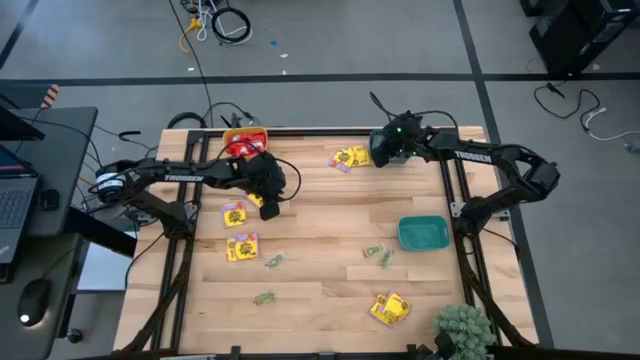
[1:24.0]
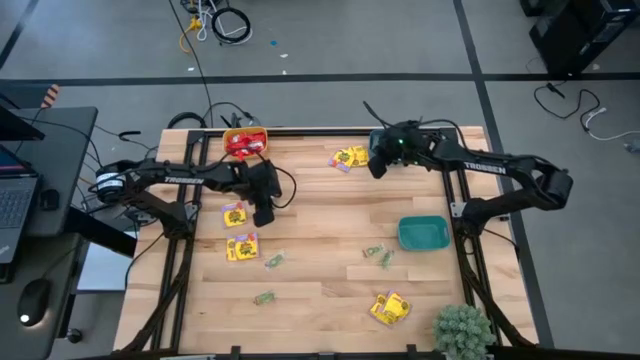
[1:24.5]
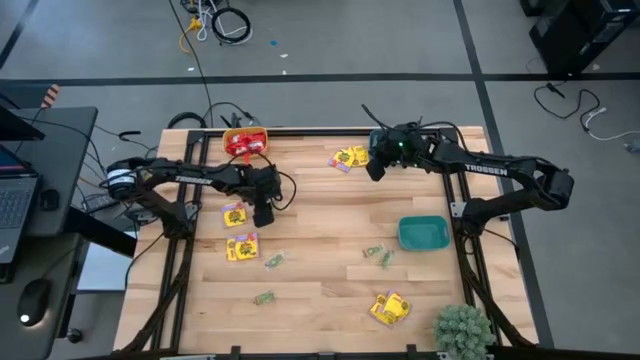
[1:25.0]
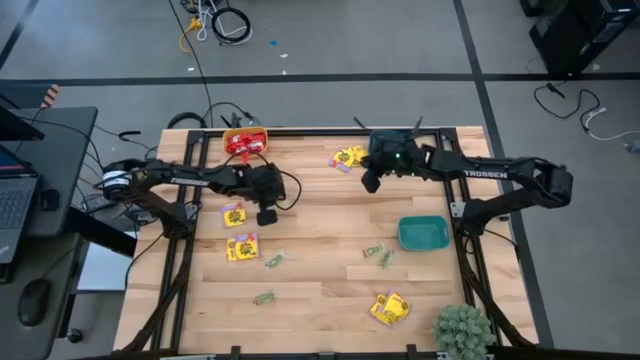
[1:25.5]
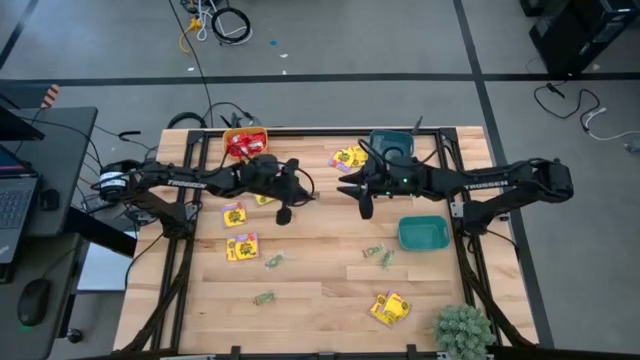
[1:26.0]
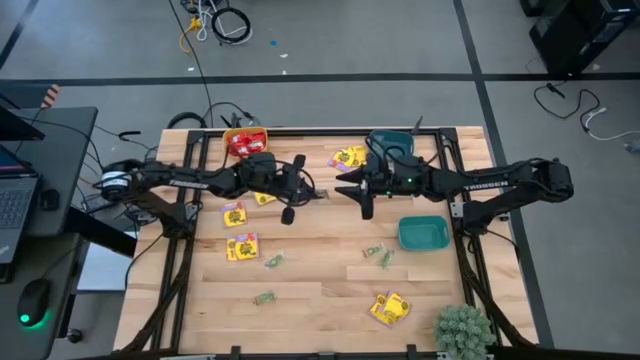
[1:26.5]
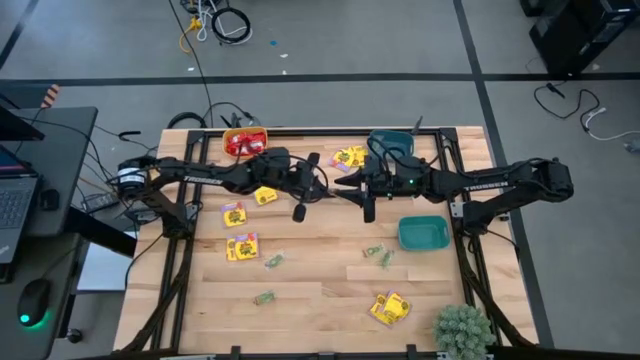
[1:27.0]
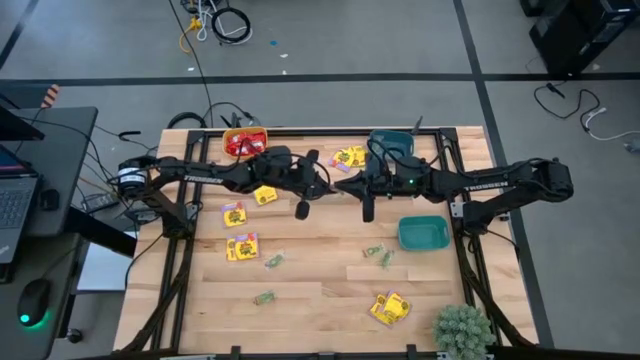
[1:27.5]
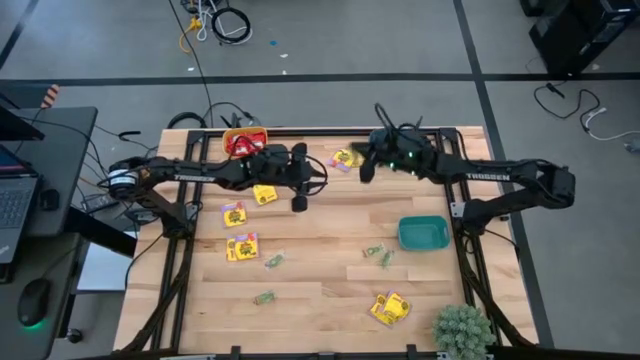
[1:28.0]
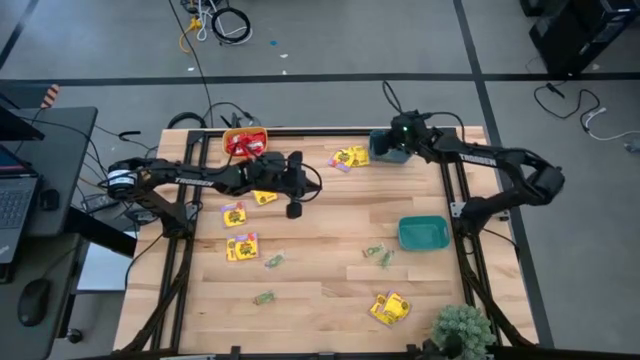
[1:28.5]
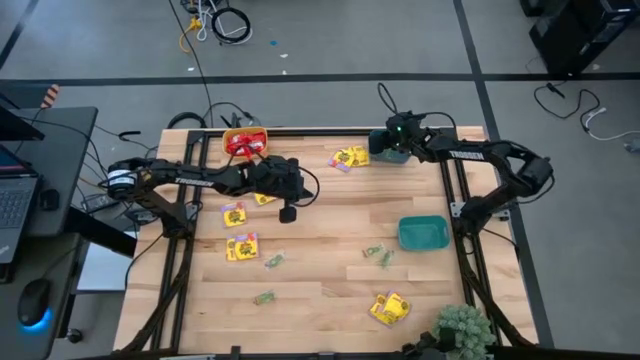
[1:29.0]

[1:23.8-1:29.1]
Task: Sort candy
Put the green gummy into the blue bin

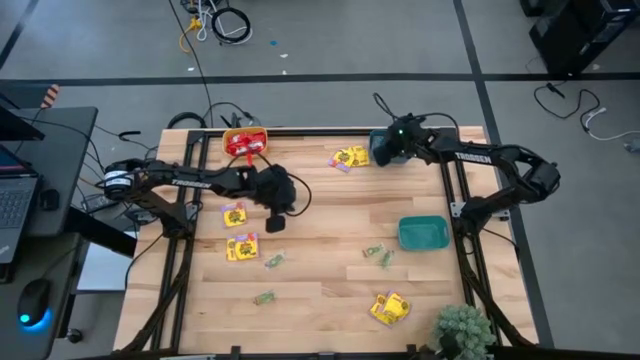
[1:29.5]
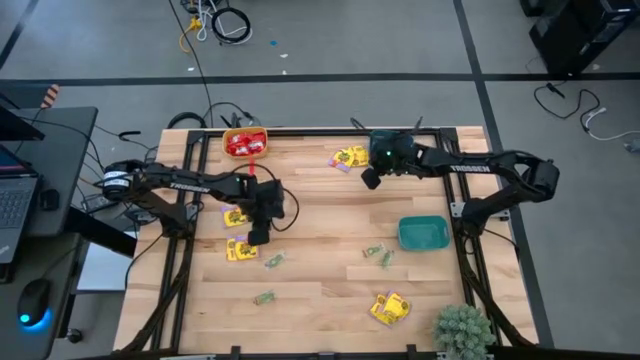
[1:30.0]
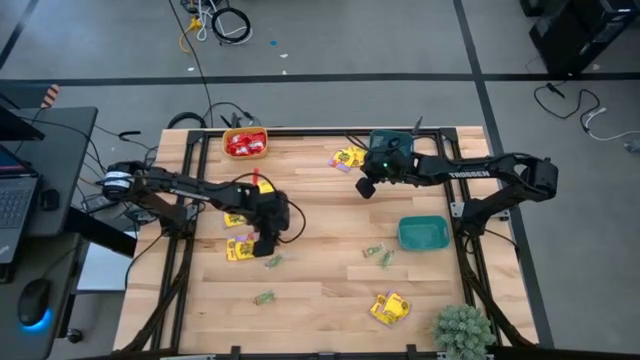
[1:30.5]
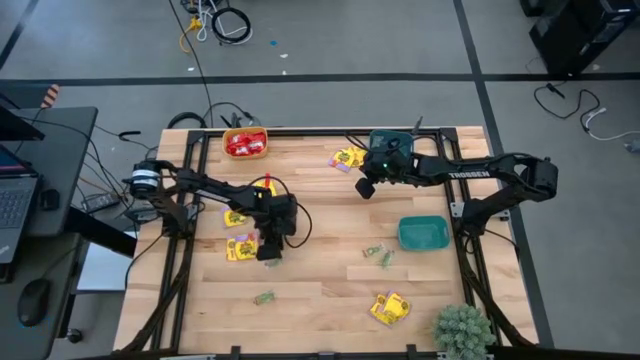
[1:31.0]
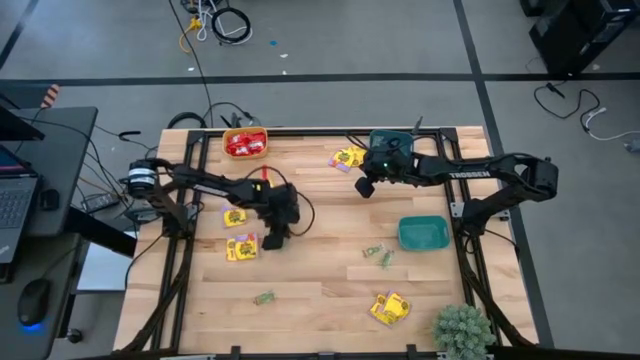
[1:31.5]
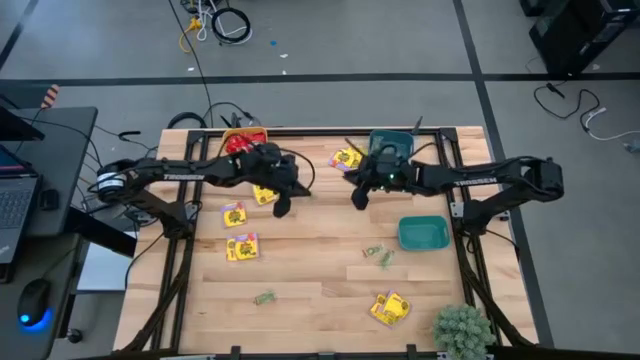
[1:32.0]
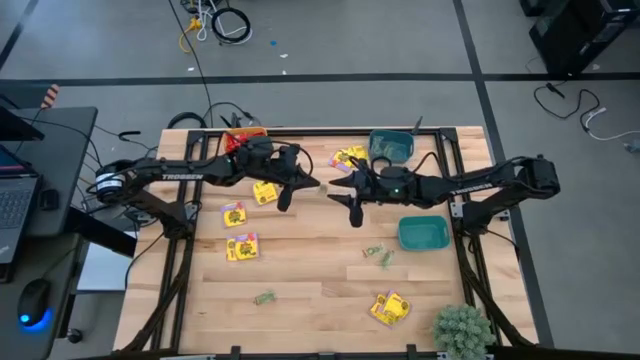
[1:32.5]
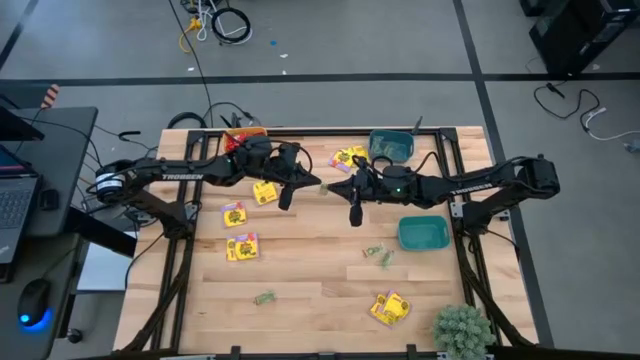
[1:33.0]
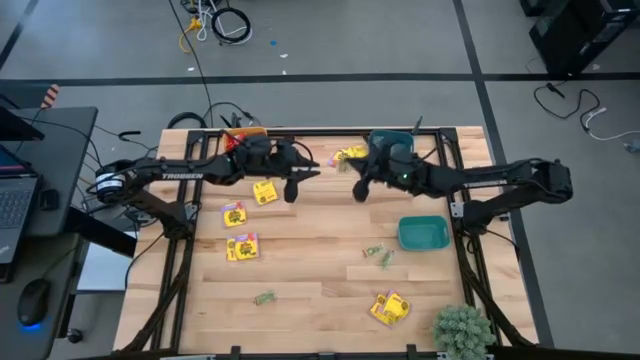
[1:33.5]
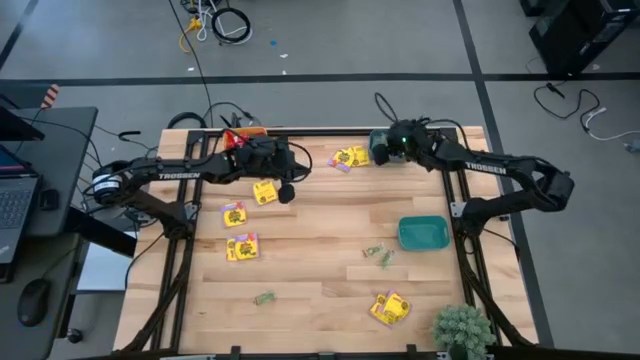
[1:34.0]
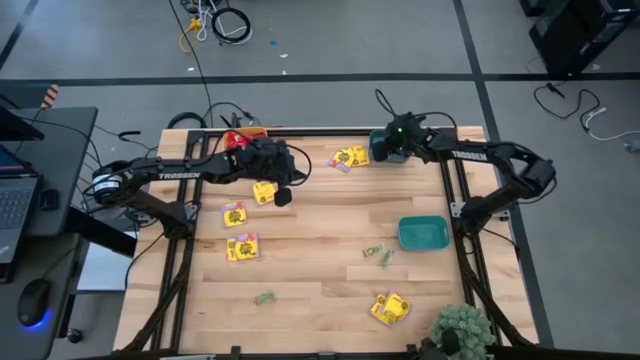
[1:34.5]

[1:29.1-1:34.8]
Put the green gummy into the blue bin

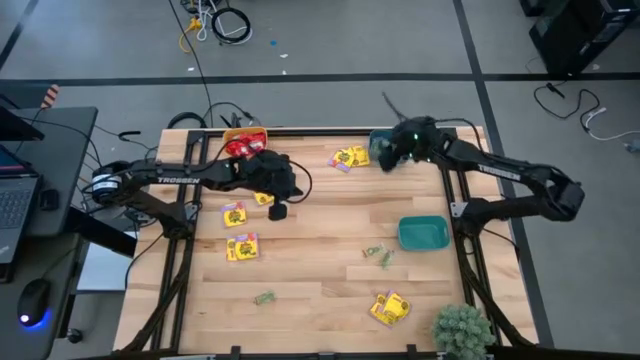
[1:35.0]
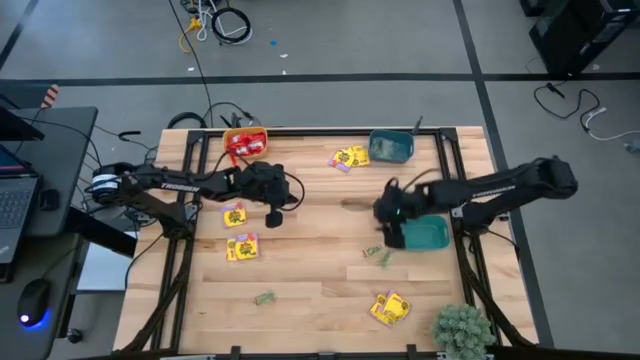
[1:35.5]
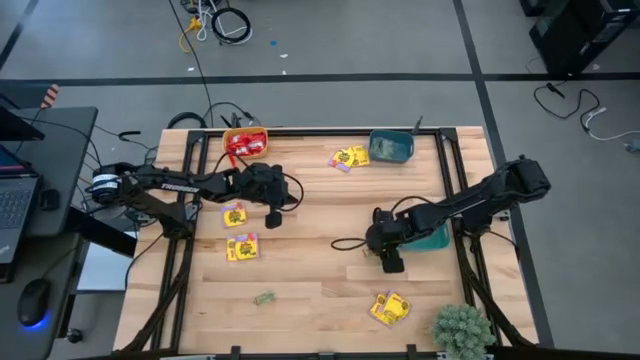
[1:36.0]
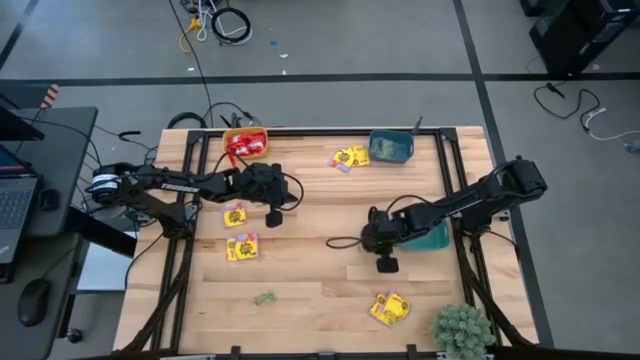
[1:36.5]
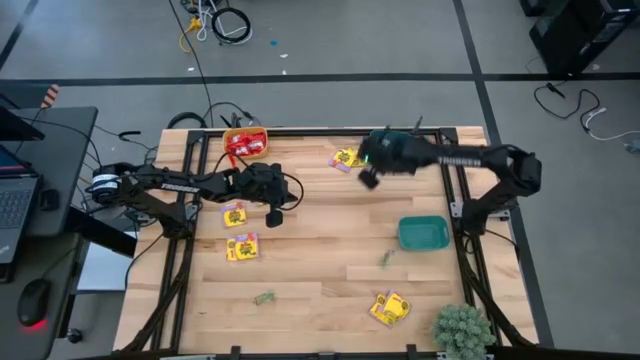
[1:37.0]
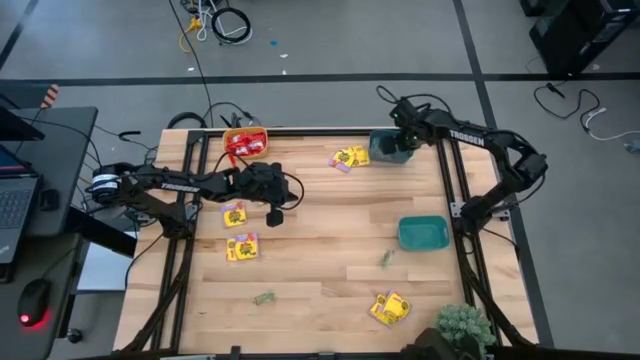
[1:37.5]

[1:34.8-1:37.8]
Put the green gummy into the blue bin

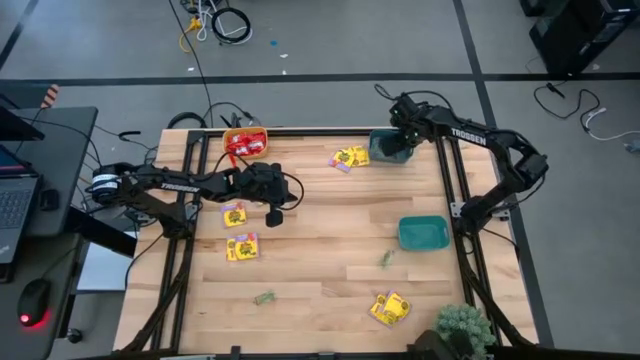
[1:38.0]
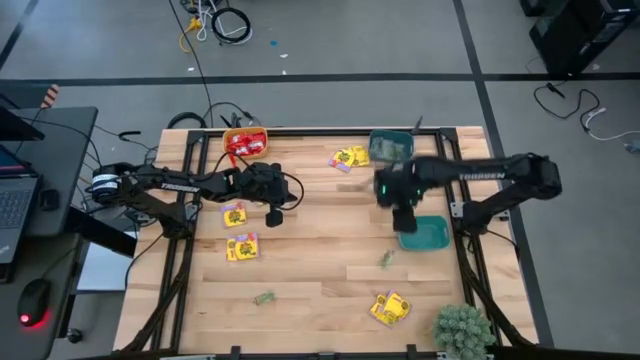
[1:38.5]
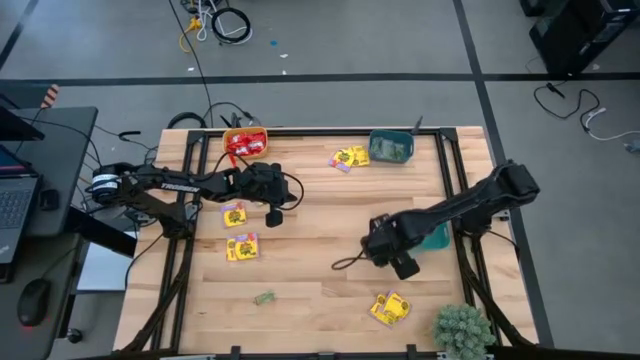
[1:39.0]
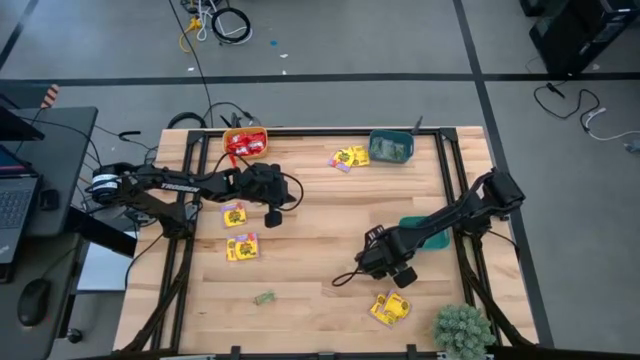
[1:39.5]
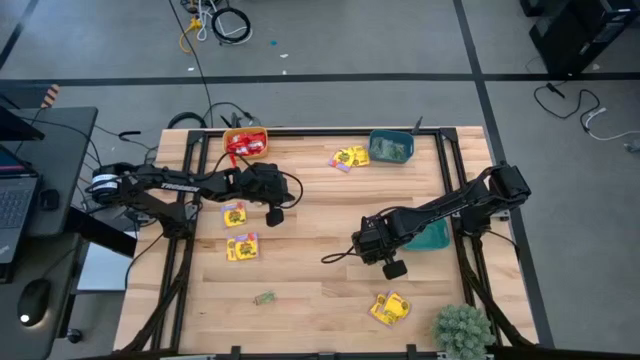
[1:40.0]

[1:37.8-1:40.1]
Put the green gummy into the blue bin

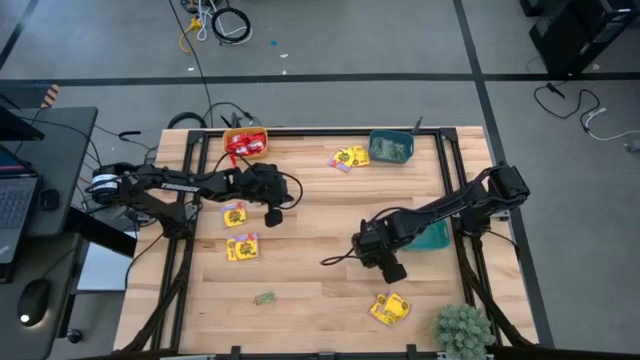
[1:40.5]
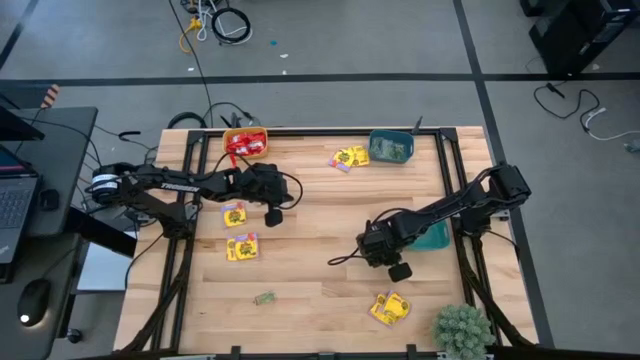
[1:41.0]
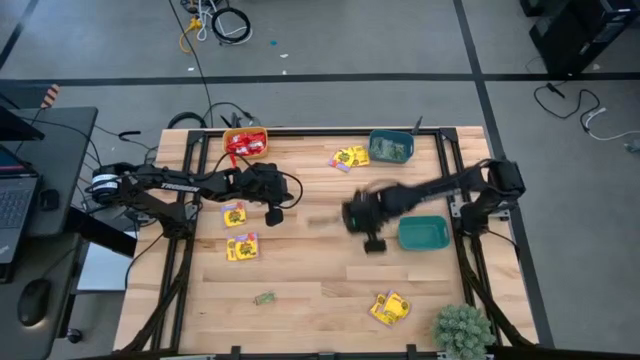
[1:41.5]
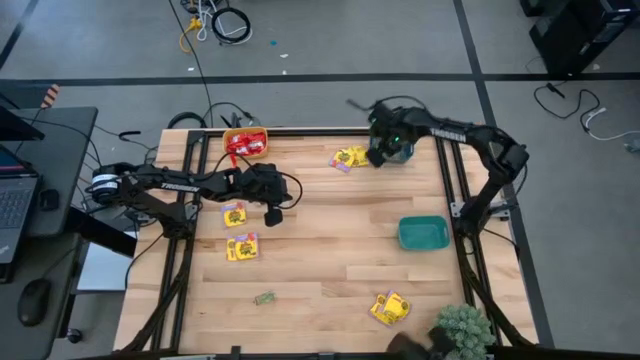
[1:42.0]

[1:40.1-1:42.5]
Put the green gummy into the blue bin

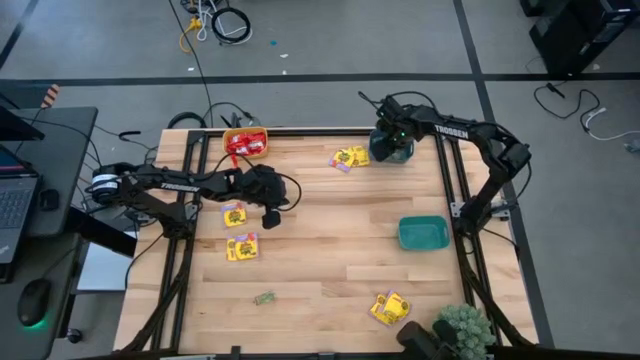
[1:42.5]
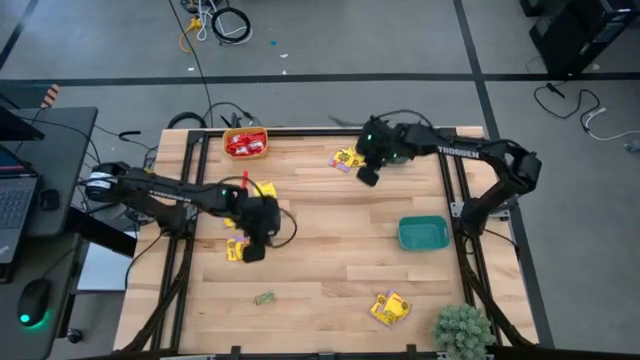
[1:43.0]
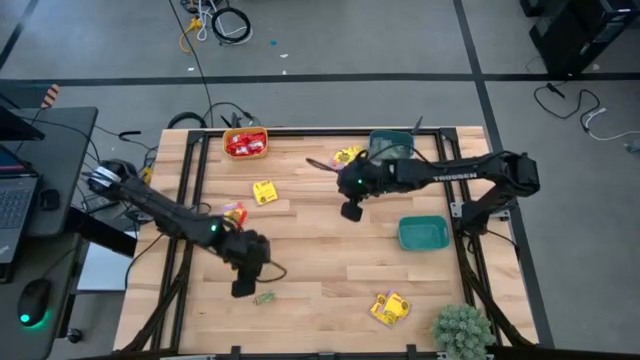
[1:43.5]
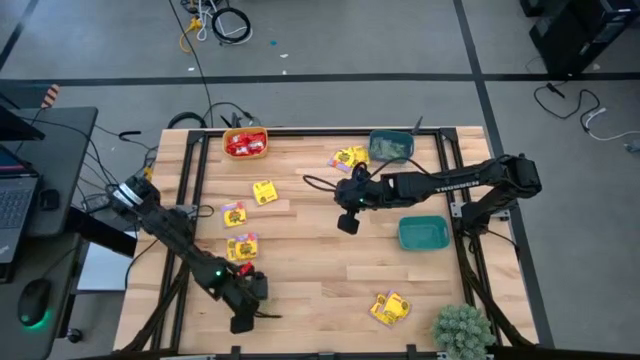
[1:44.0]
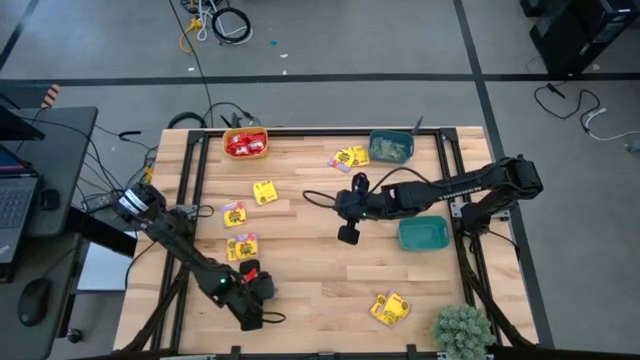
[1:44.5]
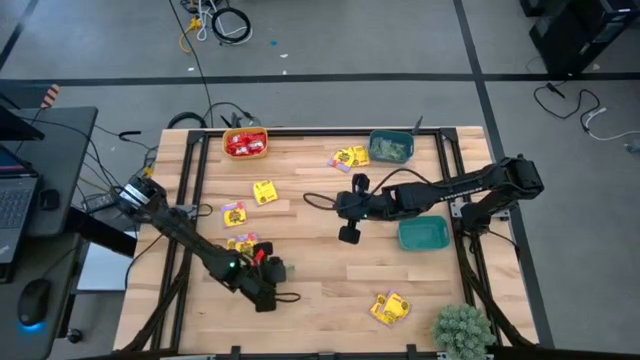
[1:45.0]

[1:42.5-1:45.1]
Put the green gummy into the blue bin
